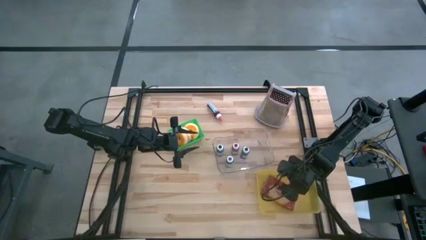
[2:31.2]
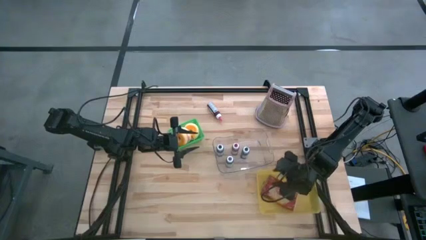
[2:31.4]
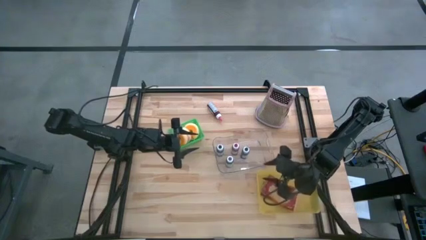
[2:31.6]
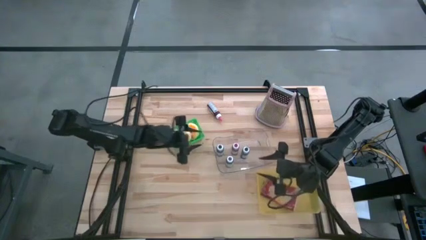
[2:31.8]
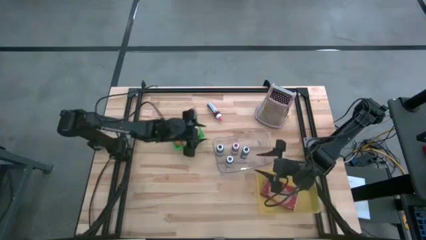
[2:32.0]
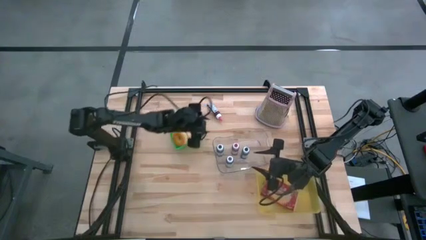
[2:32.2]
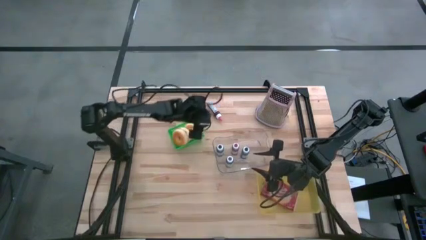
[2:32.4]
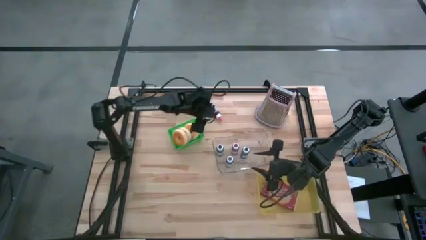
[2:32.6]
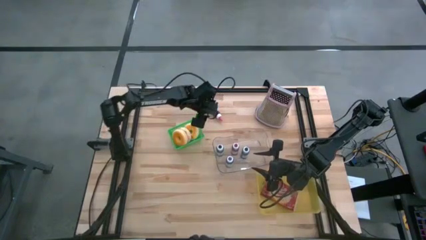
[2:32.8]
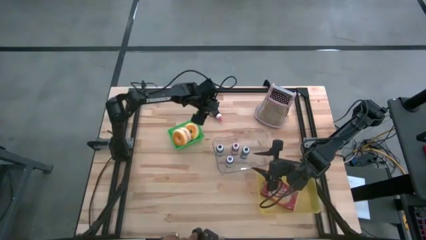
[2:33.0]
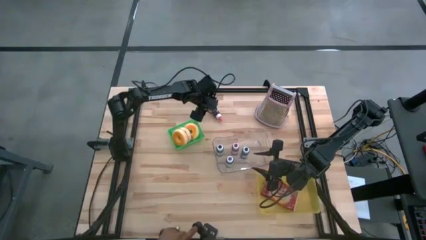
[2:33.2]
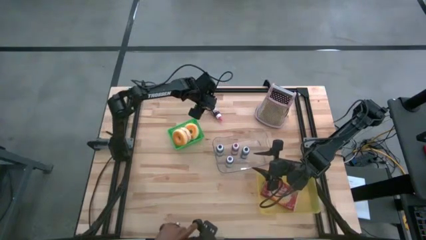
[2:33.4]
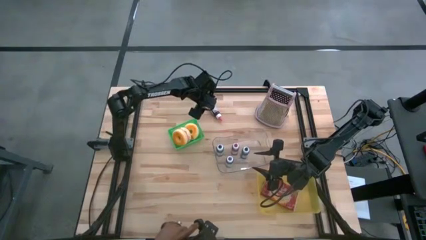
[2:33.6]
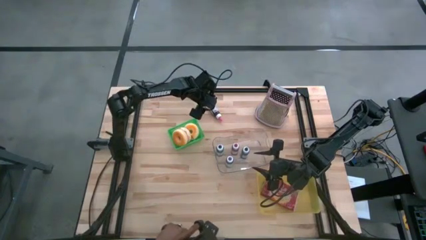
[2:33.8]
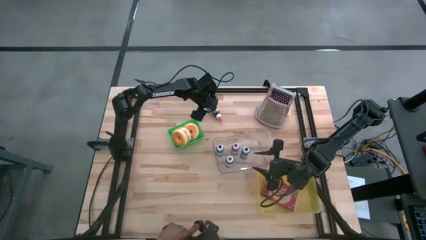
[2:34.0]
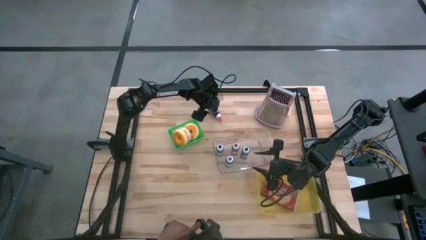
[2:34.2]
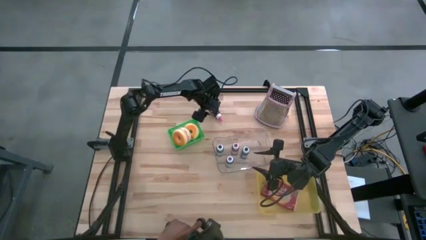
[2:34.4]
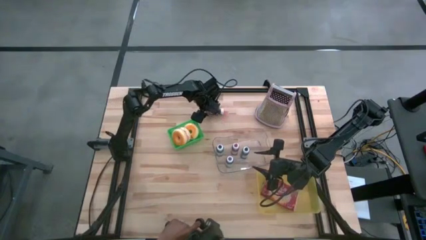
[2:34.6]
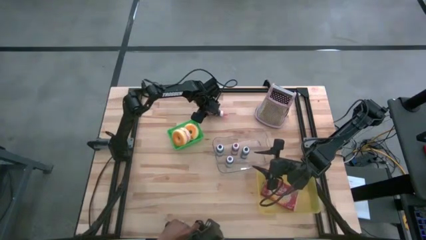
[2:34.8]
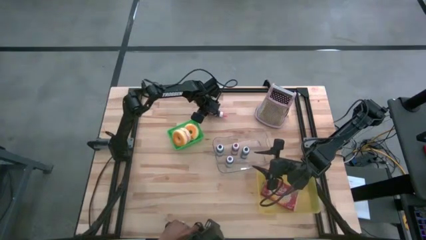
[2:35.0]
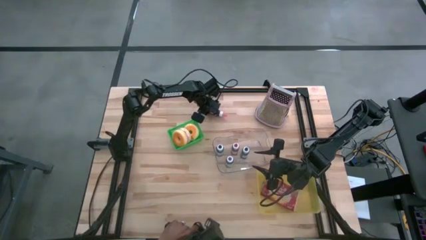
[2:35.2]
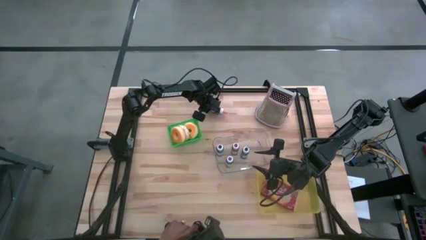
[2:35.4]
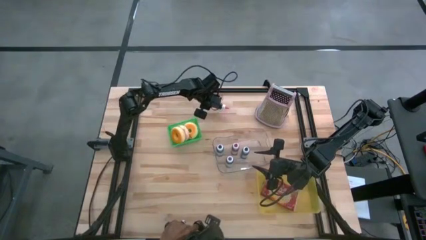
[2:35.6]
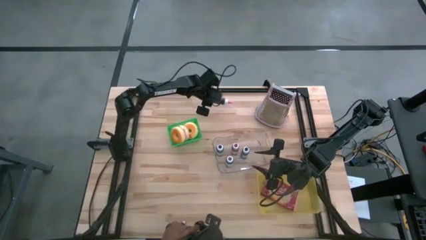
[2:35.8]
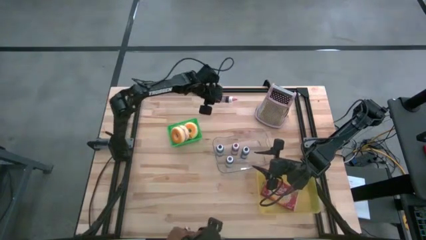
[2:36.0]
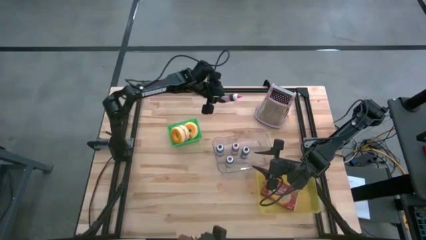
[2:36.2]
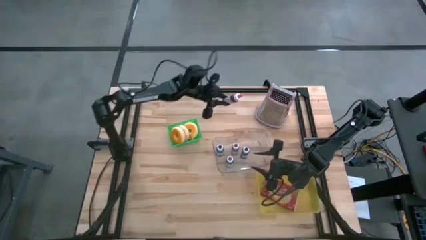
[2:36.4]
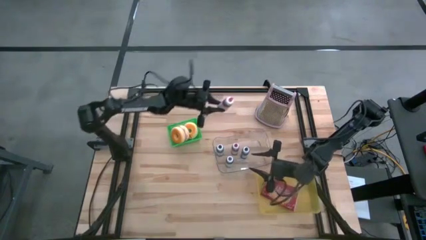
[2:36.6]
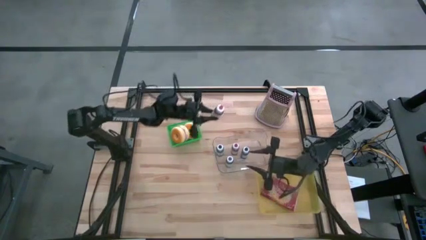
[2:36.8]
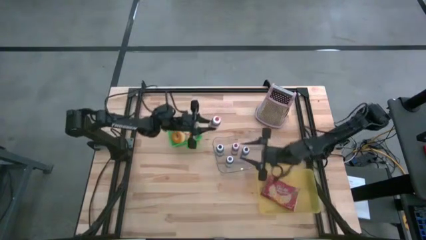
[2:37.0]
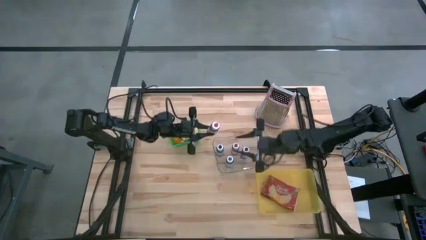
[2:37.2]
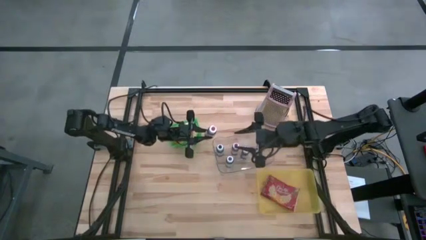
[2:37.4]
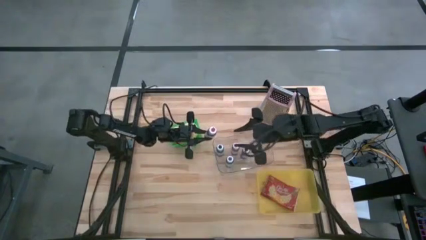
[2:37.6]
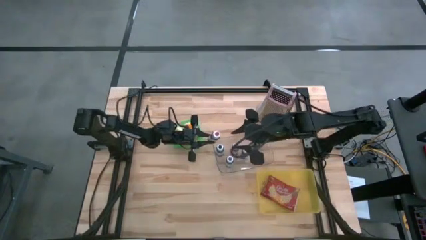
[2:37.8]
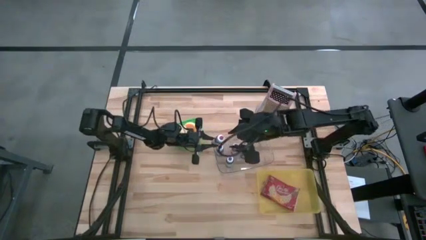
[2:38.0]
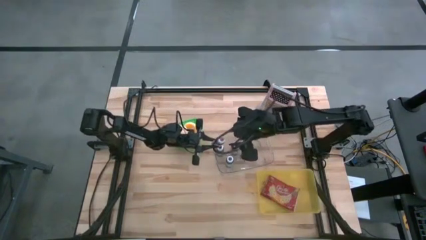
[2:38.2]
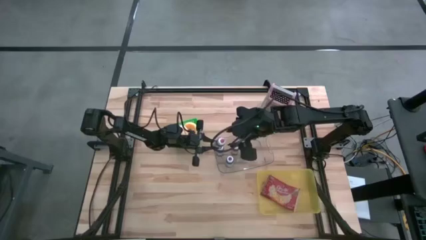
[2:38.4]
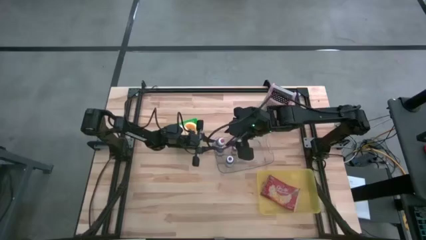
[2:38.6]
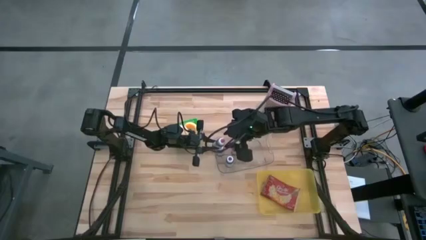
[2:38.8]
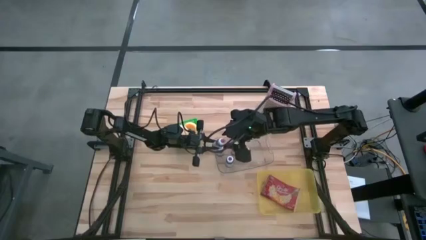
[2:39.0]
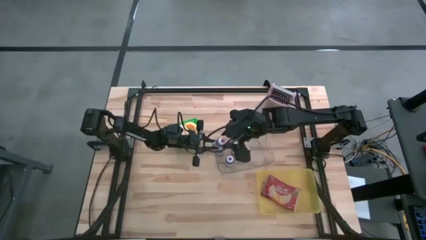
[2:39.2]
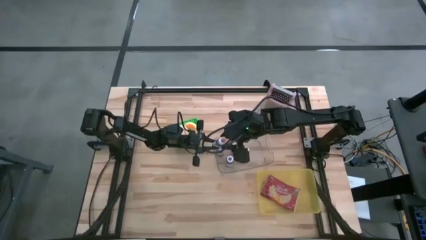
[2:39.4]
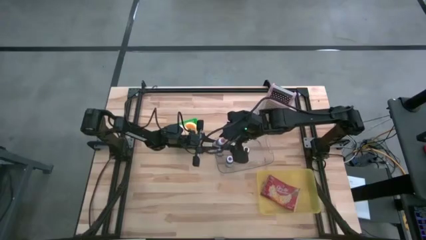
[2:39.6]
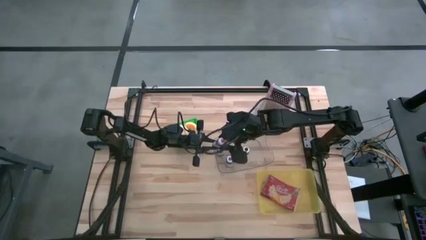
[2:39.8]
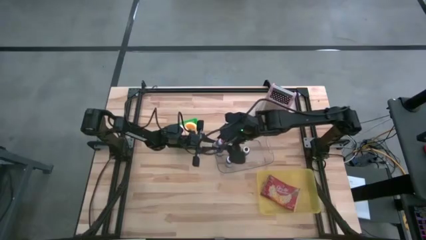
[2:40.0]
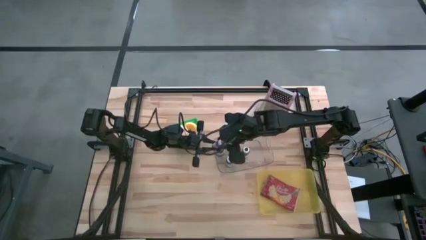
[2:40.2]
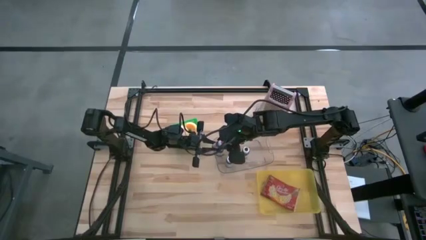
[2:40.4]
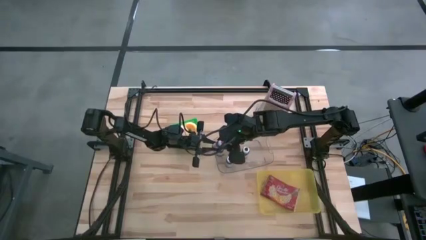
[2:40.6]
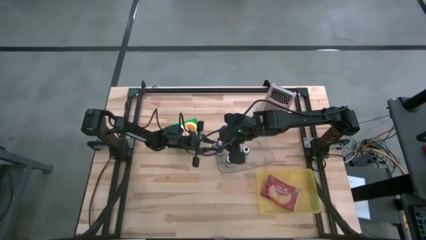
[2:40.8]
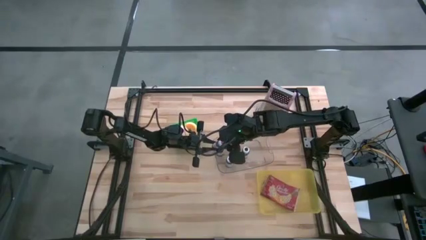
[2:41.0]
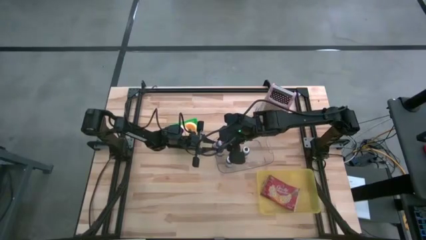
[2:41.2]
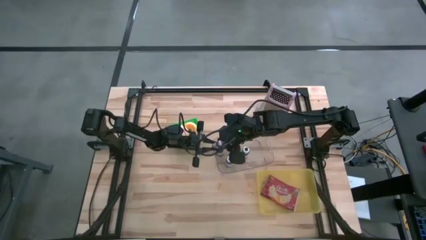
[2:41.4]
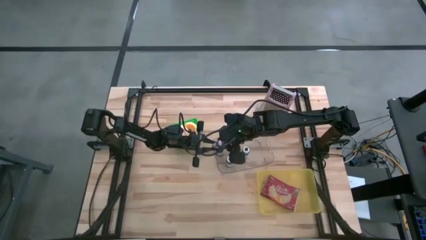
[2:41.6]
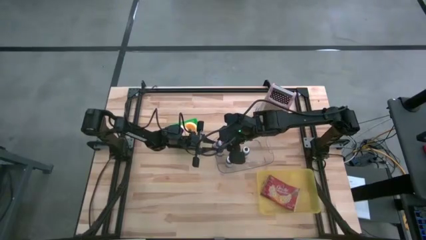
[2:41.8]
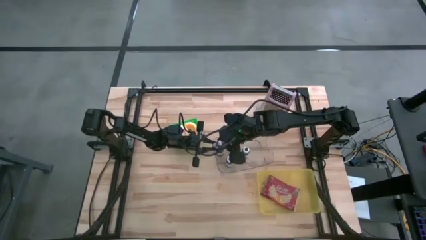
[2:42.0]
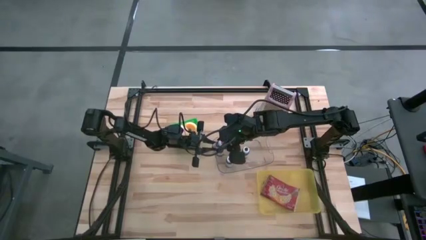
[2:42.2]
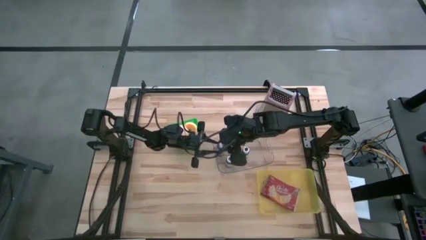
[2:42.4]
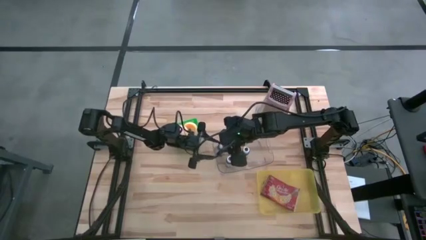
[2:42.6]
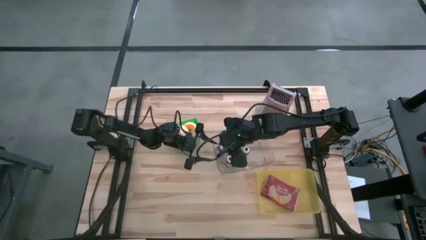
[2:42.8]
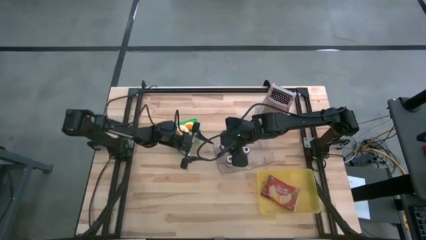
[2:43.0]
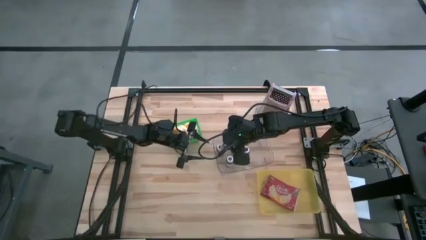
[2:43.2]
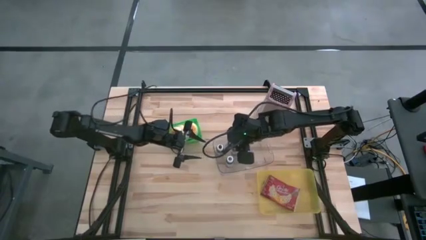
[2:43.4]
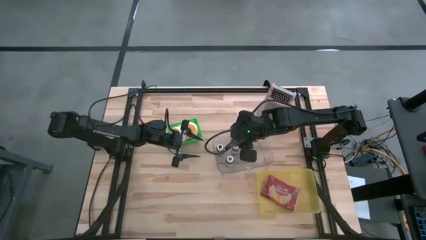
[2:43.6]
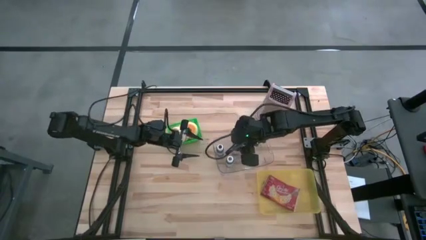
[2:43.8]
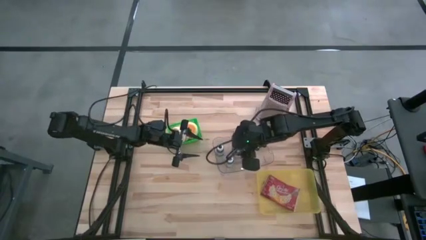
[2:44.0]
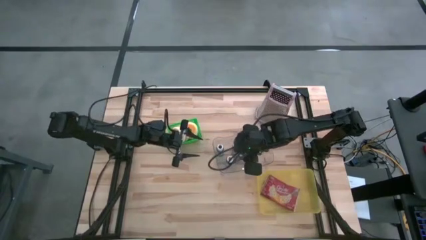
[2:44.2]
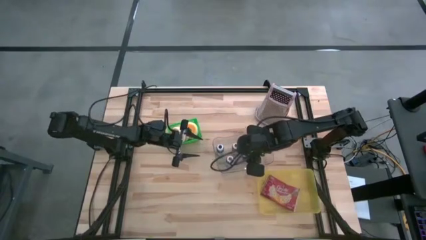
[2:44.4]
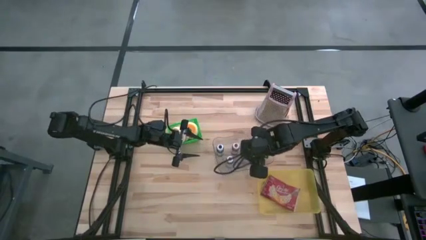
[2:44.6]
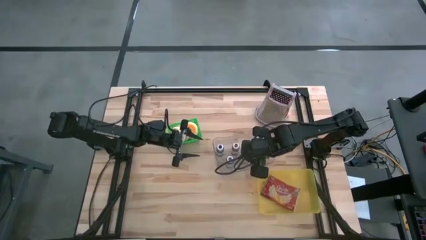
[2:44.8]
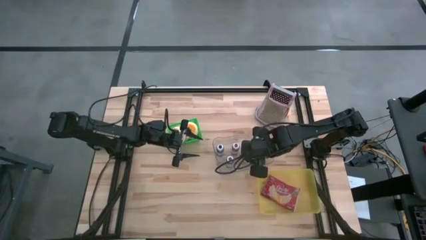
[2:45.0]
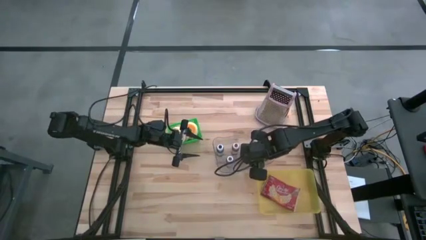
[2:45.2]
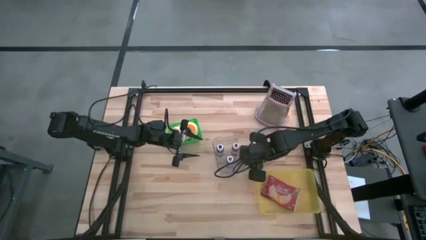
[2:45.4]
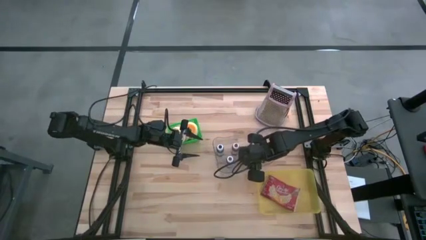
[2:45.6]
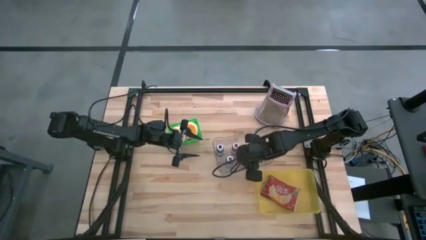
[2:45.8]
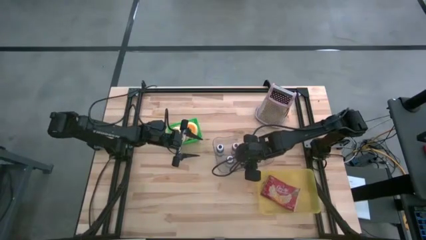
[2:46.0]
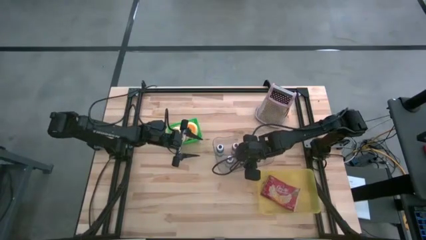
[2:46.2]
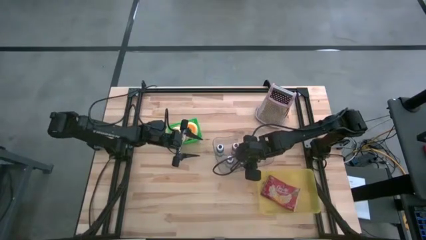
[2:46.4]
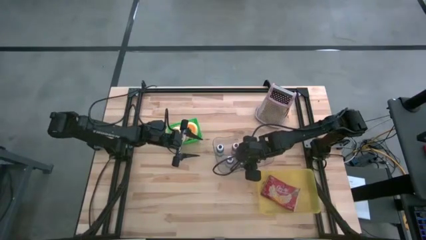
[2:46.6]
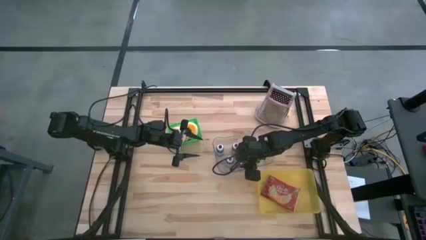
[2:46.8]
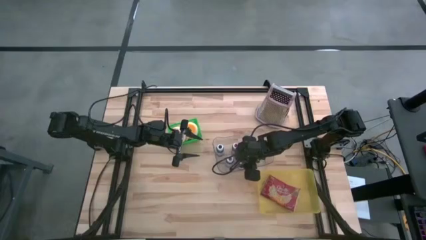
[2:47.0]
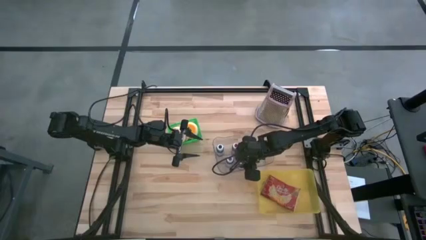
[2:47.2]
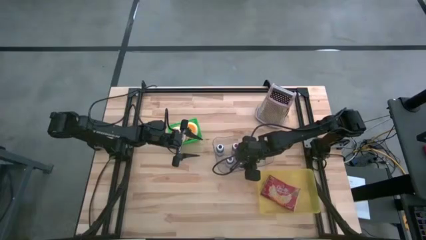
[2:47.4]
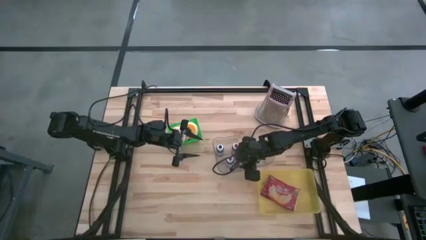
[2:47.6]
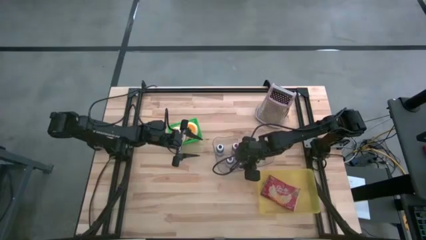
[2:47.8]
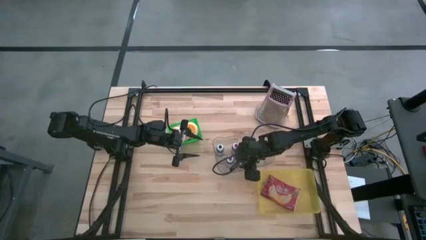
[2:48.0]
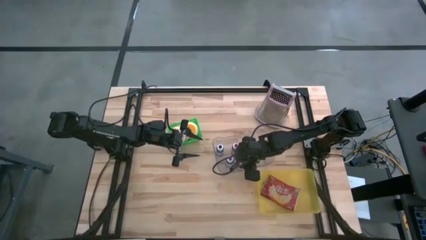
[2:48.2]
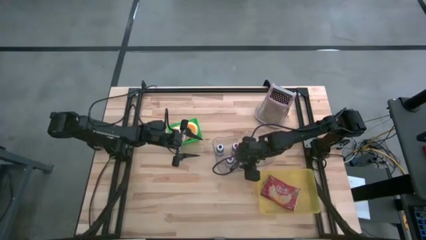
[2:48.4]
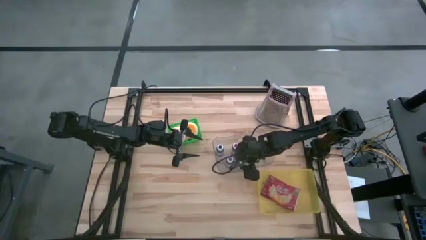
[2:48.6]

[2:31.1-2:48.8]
Task: Pick & Place Food Item
Put the pink food coloring bottle into the transparent bin
